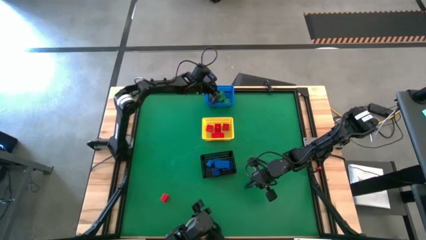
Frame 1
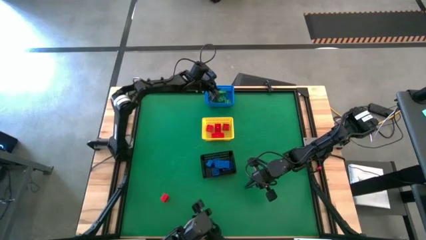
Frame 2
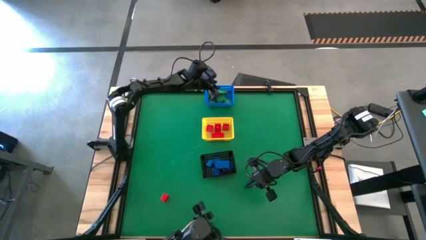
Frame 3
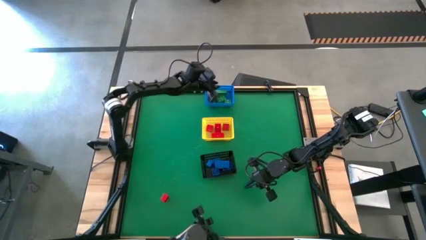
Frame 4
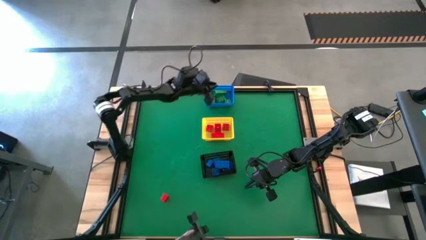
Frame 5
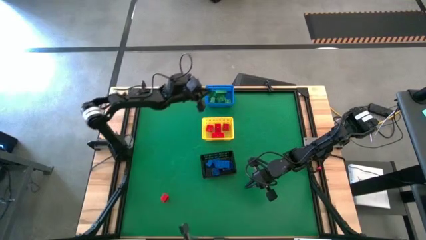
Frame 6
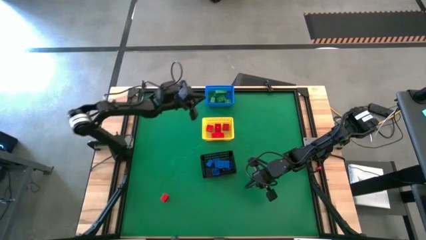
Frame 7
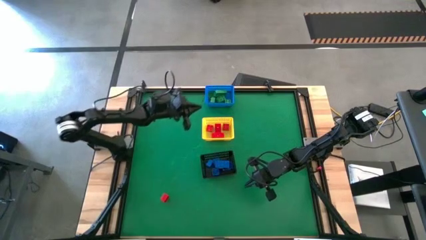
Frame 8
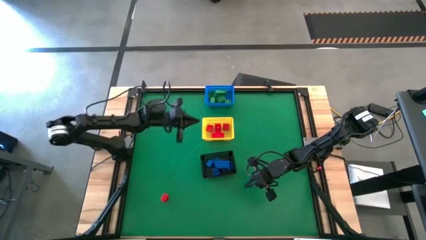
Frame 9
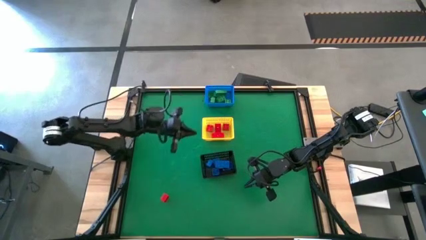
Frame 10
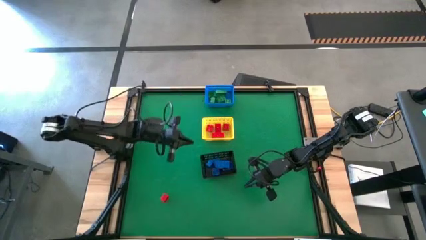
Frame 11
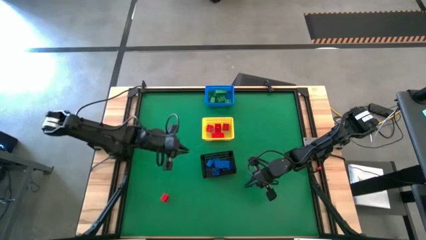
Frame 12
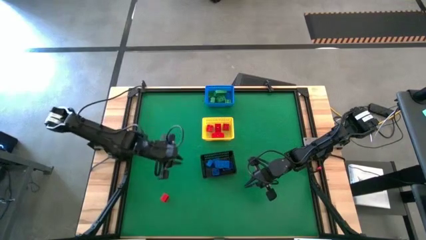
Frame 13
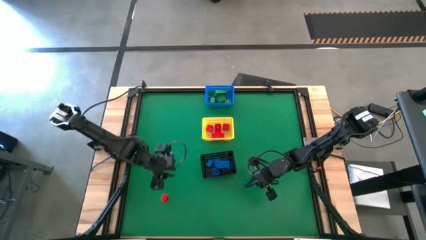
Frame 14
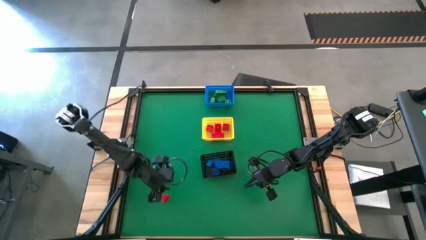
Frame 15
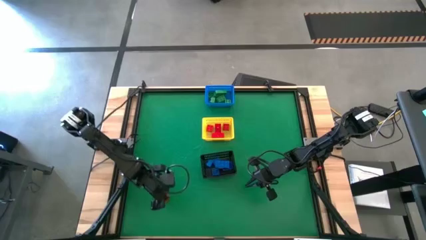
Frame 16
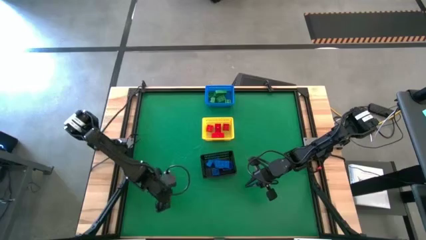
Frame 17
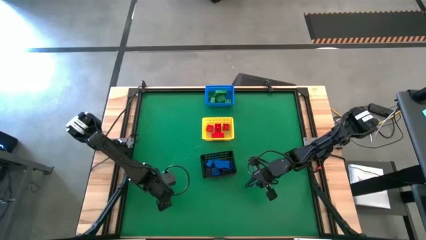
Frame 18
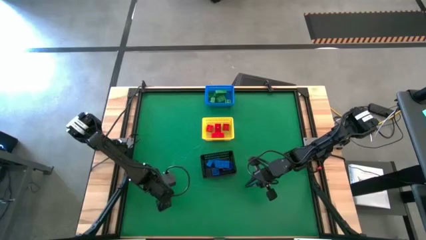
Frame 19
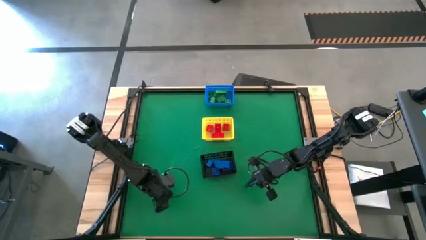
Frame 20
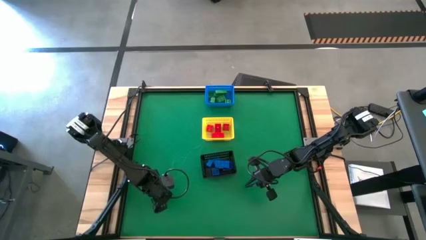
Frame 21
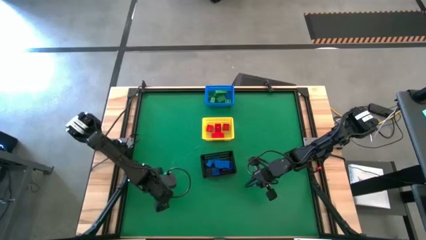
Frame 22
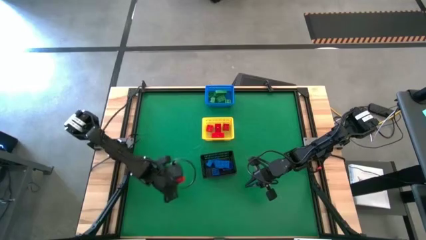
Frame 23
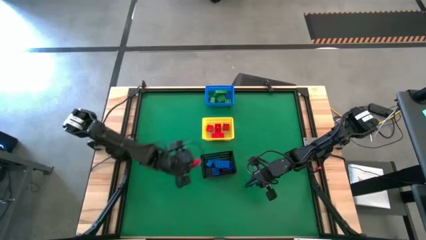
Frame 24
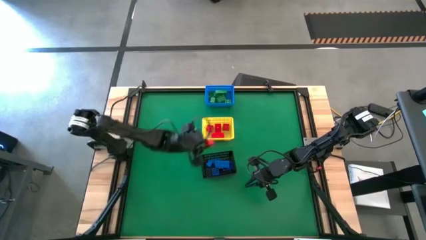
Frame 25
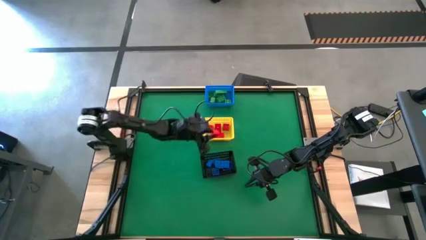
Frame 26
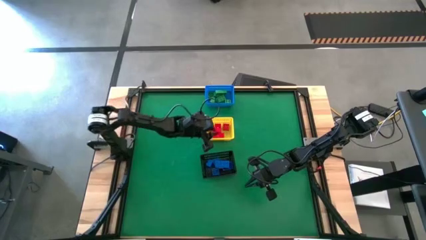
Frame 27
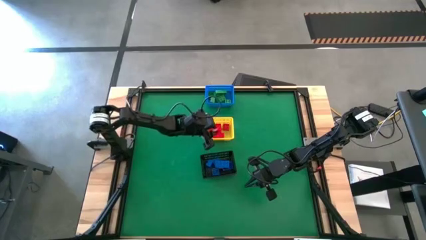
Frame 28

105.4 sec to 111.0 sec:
Task: Sort & place blocks by color
Put the red game piece into the yellow bin

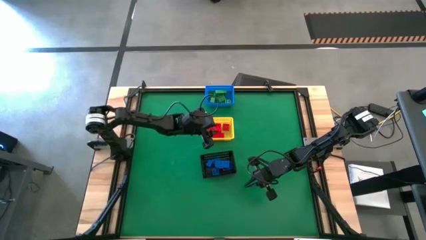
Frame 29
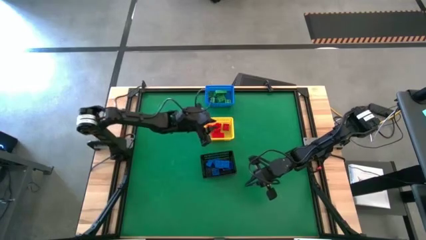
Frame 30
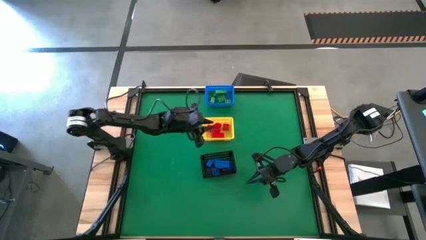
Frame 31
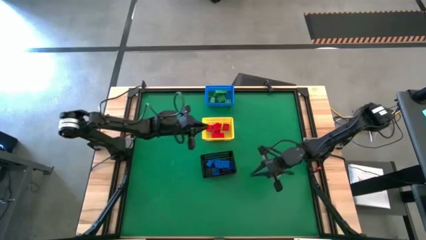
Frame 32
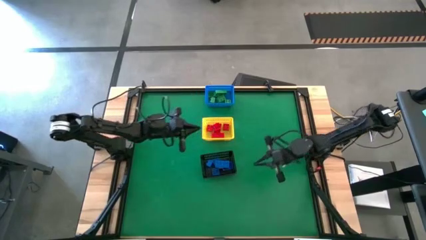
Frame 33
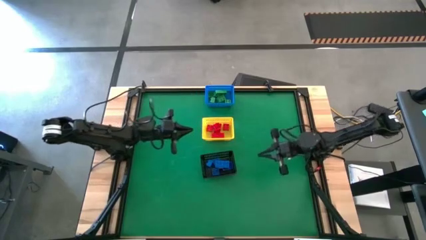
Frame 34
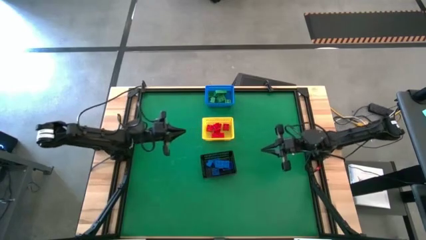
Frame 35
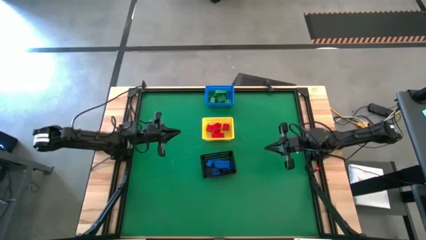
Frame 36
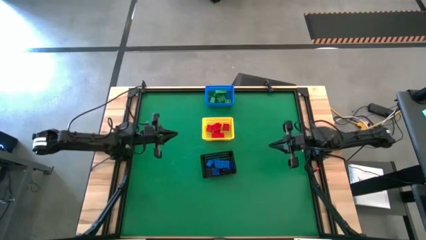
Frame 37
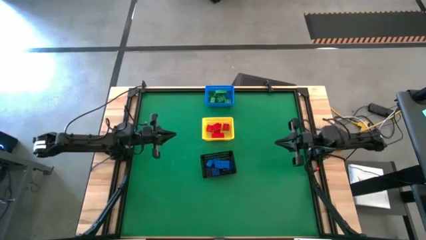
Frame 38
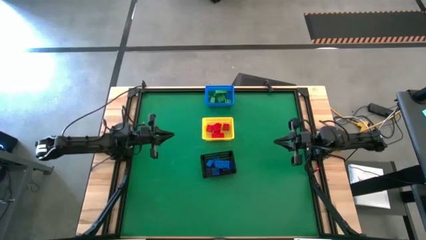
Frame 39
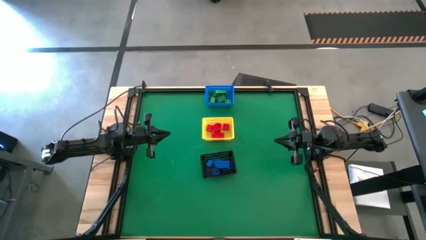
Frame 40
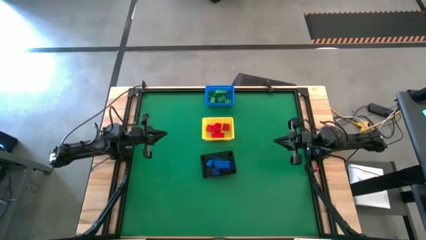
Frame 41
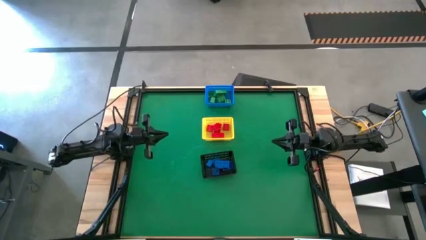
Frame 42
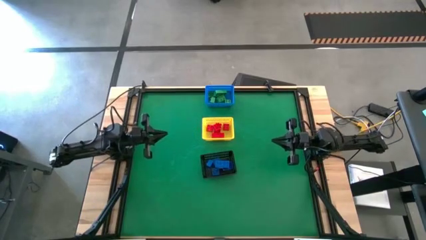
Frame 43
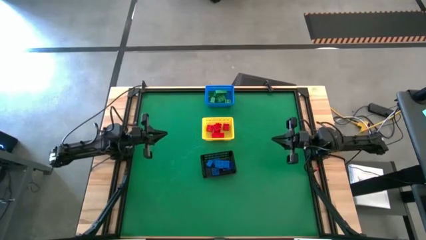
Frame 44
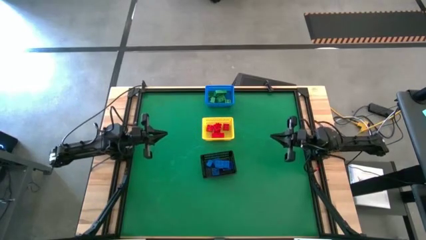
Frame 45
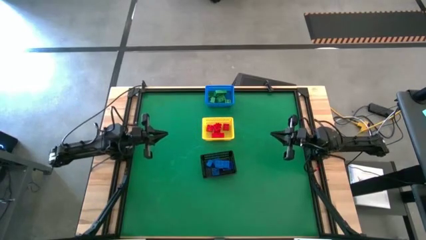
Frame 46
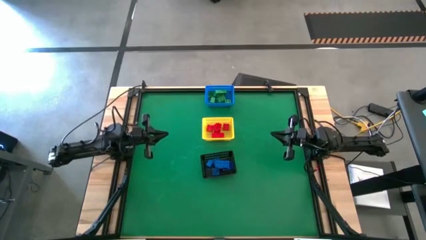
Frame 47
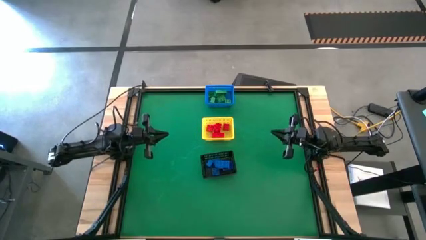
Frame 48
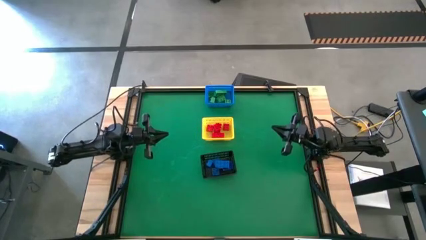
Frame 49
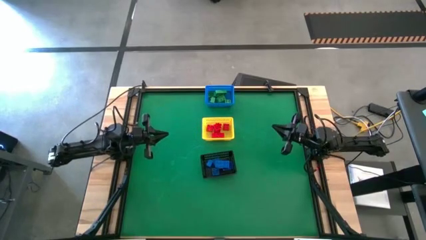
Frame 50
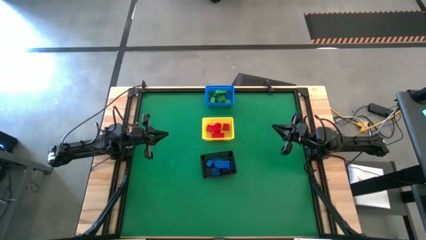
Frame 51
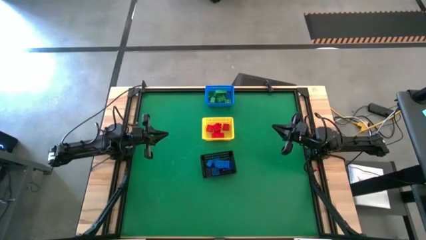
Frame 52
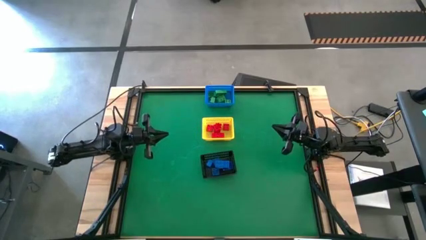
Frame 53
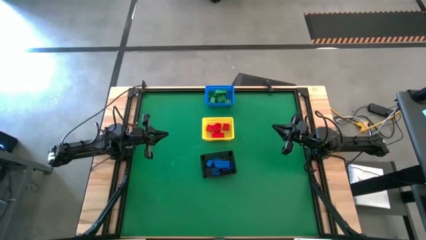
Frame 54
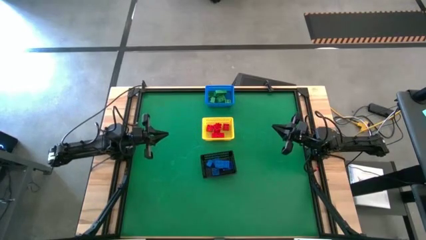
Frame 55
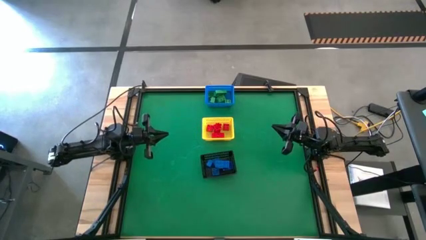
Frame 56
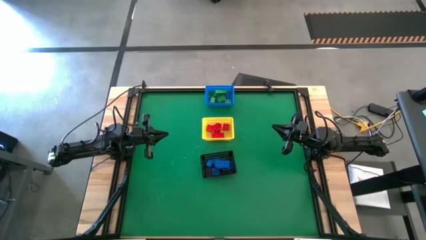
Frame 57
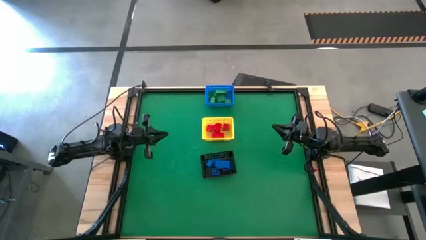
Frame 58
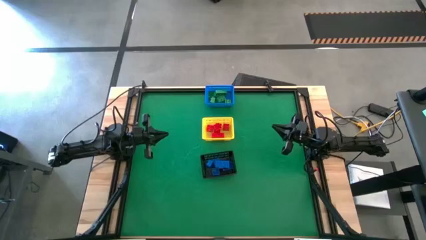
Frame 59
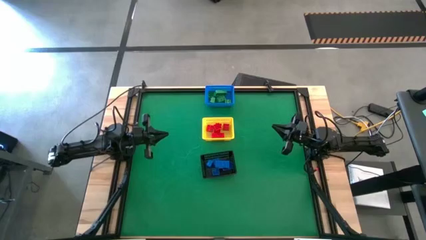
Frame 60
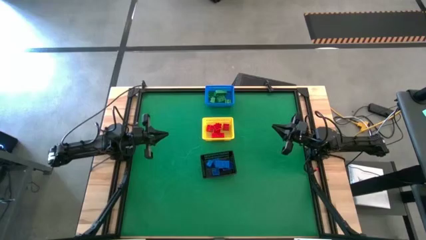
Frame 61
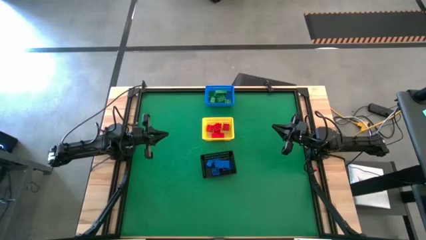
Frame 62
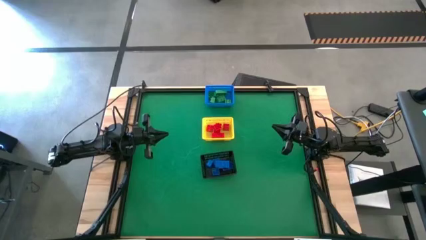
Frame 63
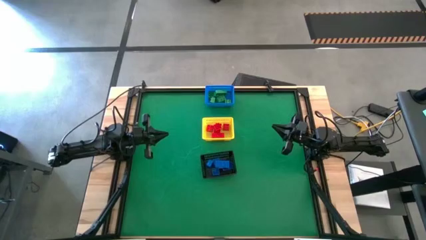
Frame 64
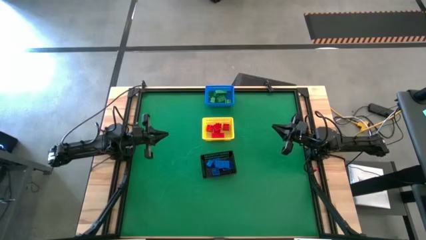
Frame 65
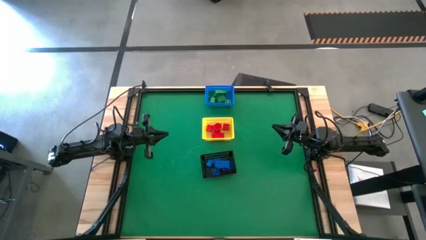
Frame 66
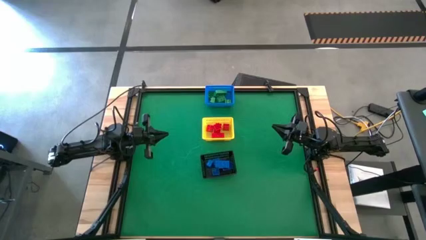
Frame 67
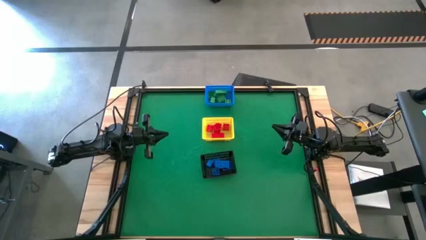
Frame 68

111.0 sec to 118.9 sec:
Return to Home Position

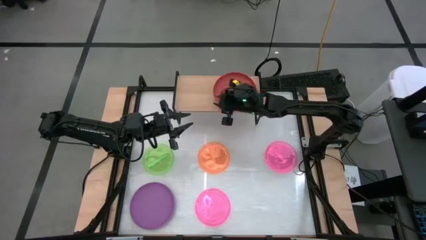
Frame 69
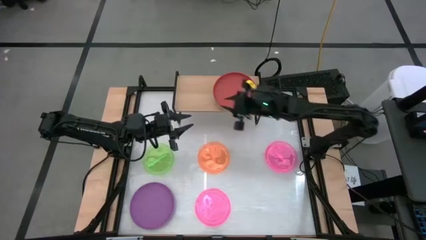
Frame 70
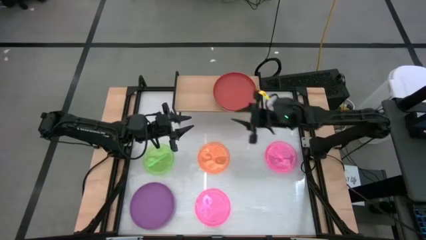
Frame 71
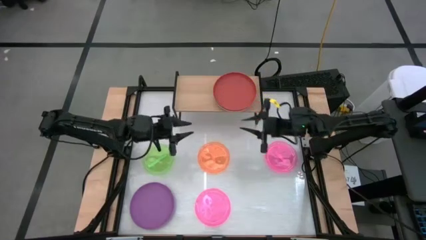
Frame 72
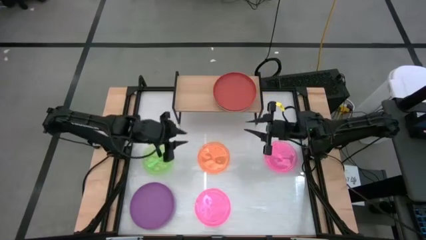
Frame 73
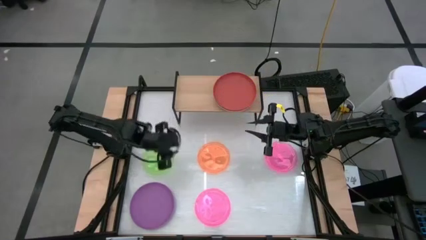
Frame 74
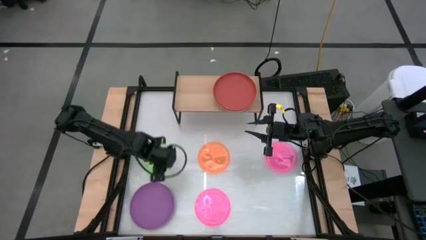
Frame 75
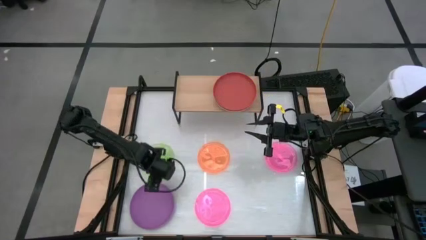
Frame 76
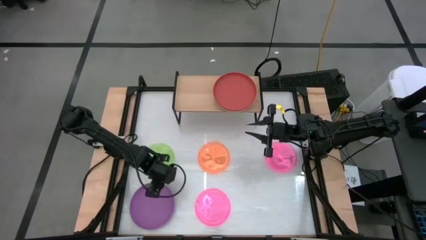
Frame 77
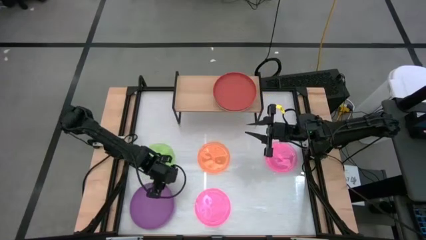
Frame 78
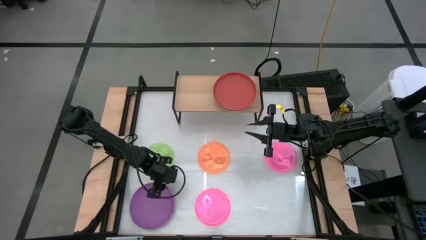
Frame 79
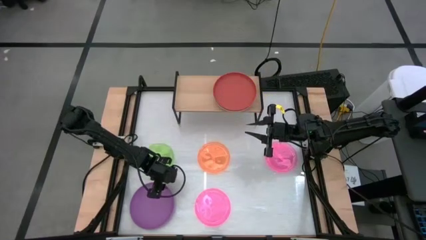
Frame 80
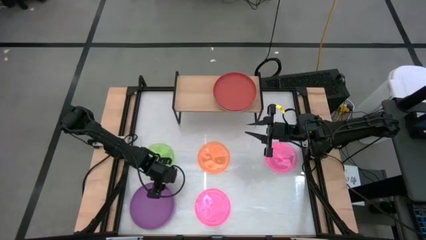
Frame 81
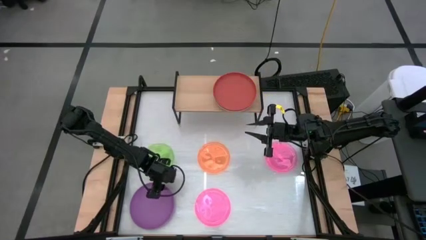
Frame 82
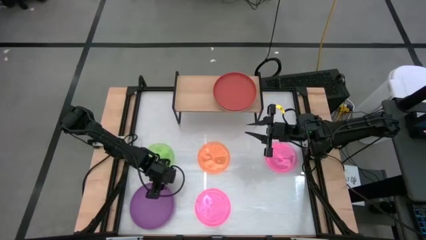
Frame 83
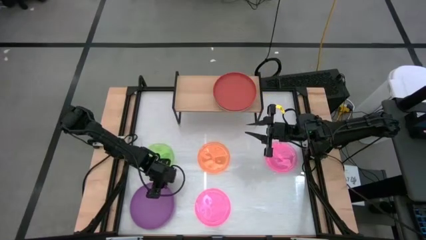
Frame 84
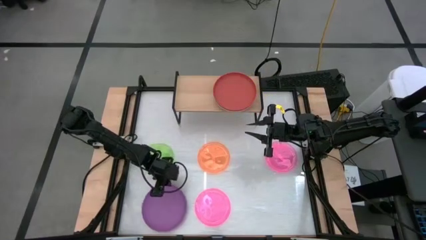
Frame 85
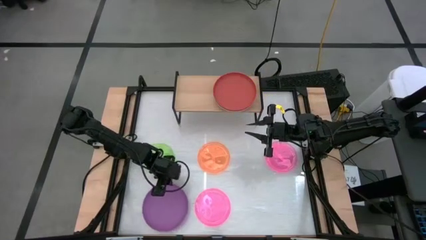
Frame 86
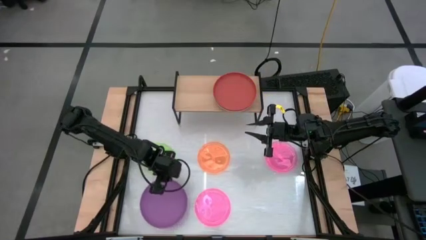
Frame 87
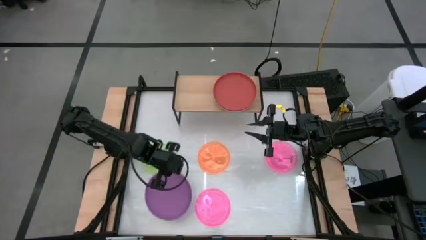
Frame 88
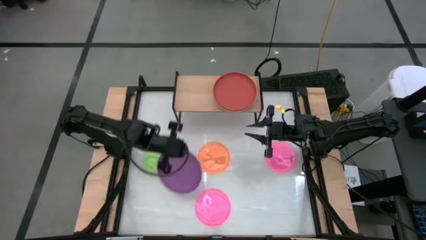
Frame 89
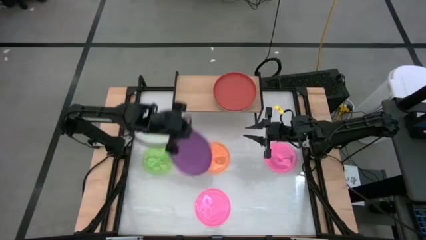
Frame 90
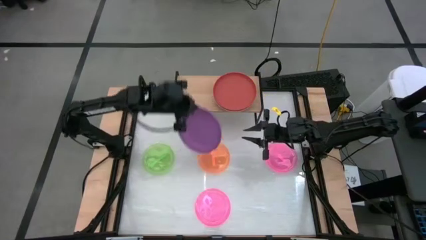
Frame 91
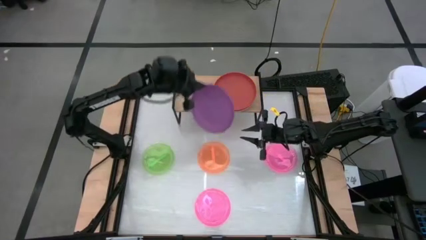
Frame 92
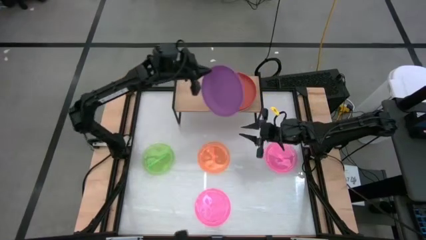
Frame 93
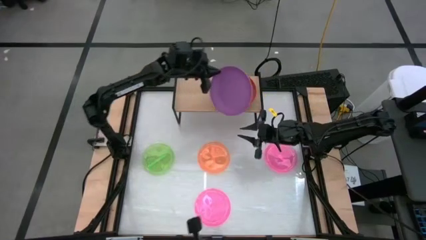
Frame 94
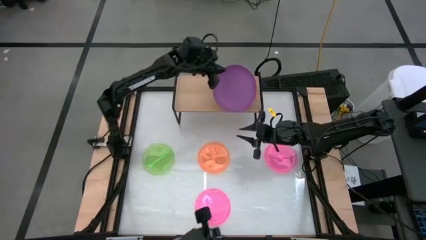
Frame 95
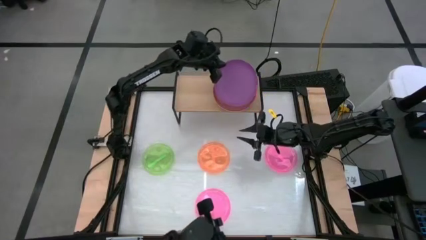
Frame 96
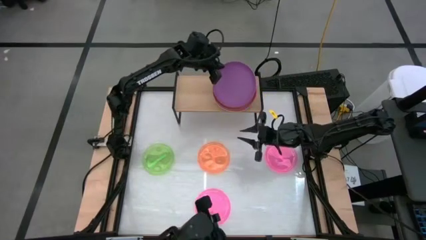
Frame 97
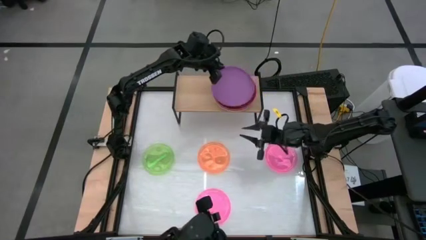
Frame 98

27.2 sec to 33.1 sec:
Task: Place and stack plates onto a shelf
Stack the purple plate on top of the orange plate on the shelf
